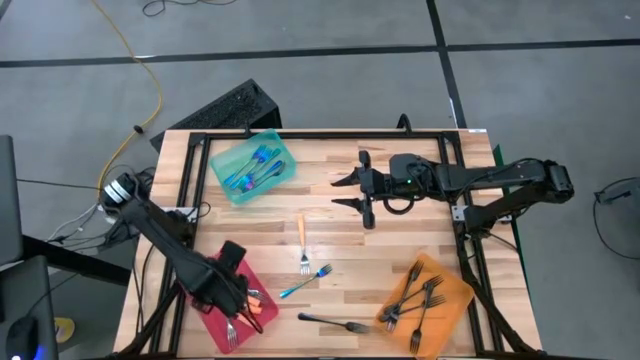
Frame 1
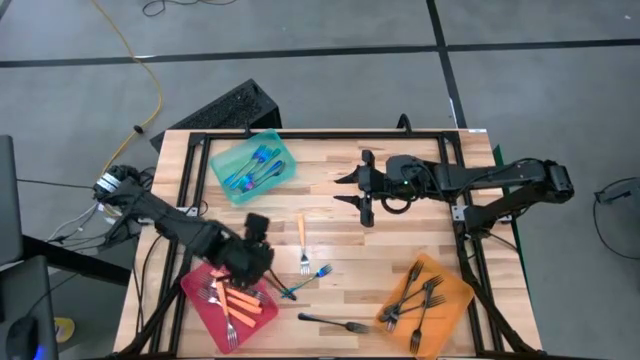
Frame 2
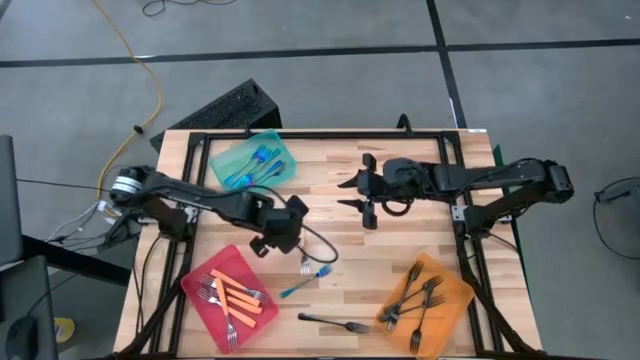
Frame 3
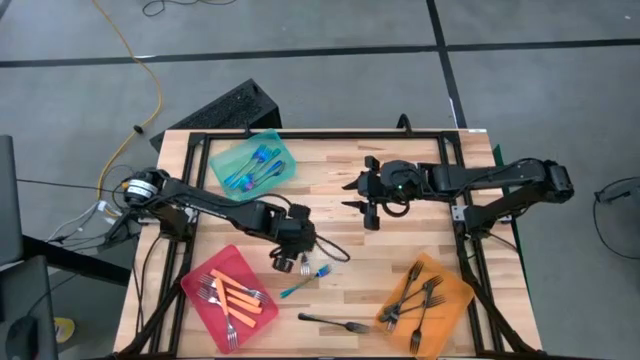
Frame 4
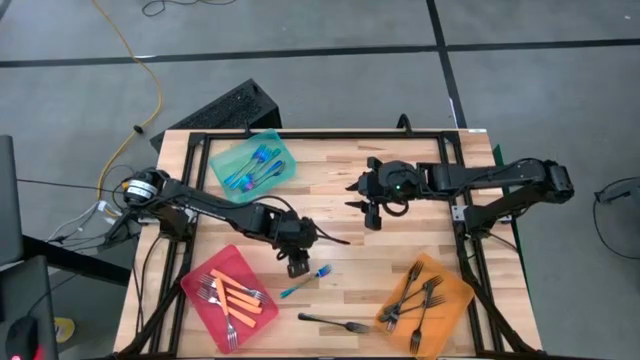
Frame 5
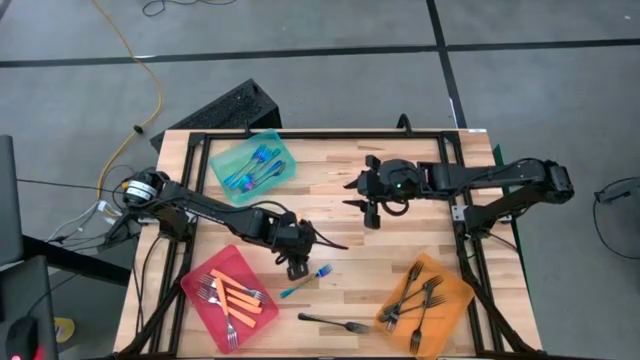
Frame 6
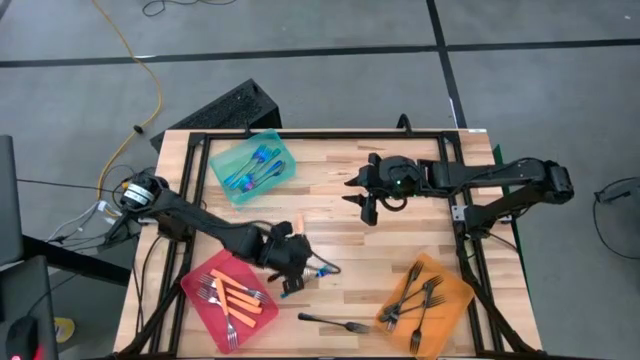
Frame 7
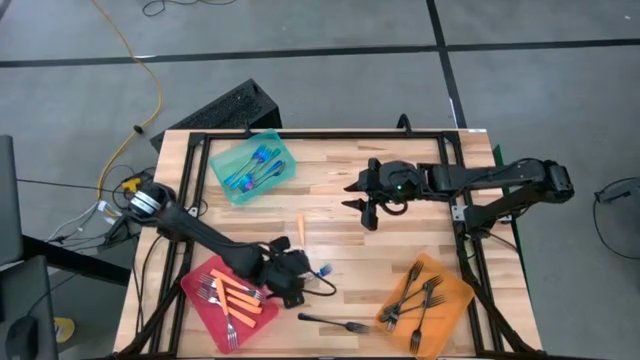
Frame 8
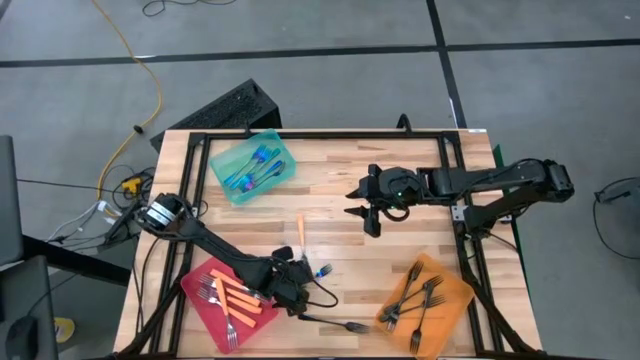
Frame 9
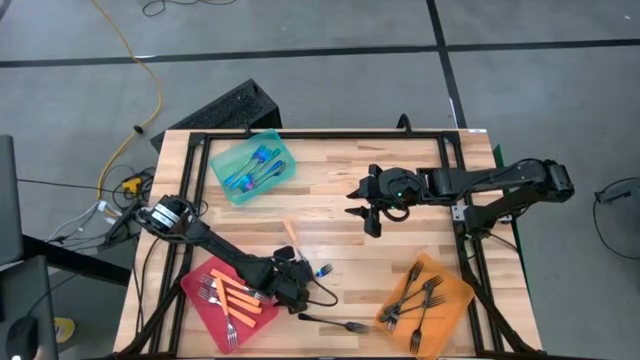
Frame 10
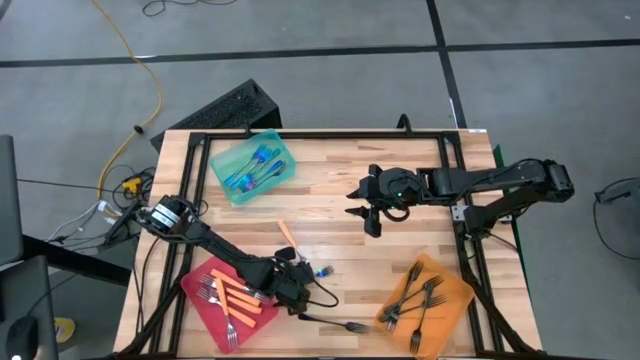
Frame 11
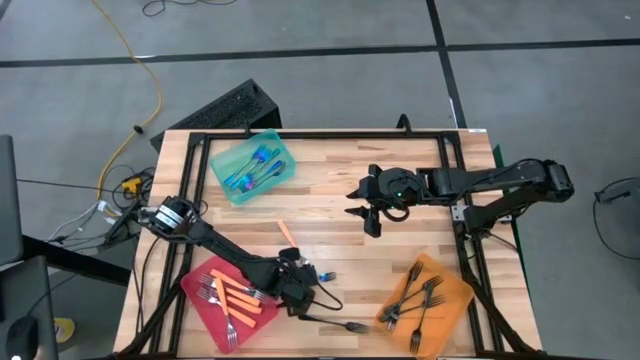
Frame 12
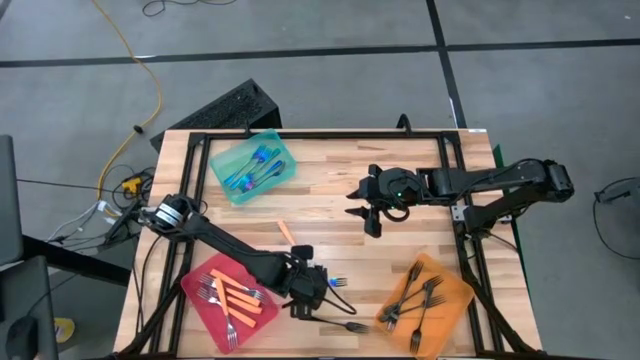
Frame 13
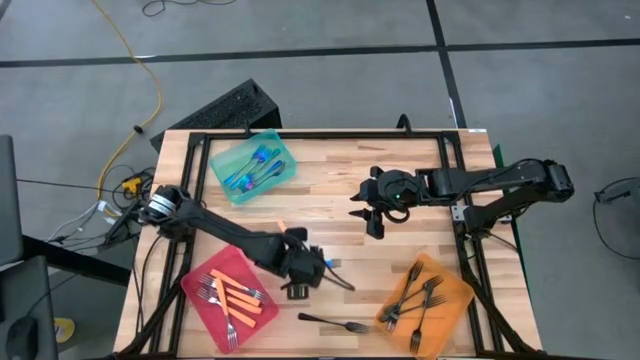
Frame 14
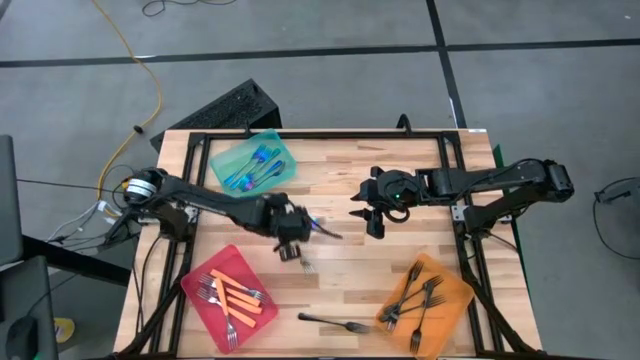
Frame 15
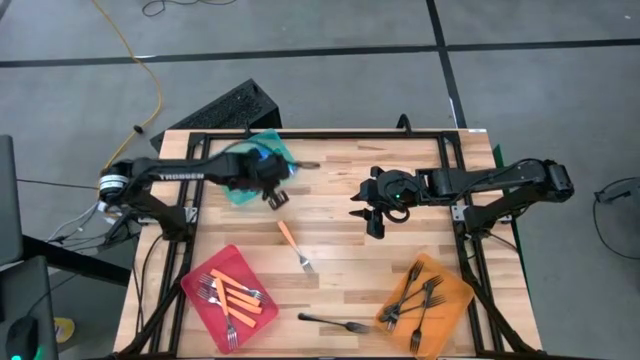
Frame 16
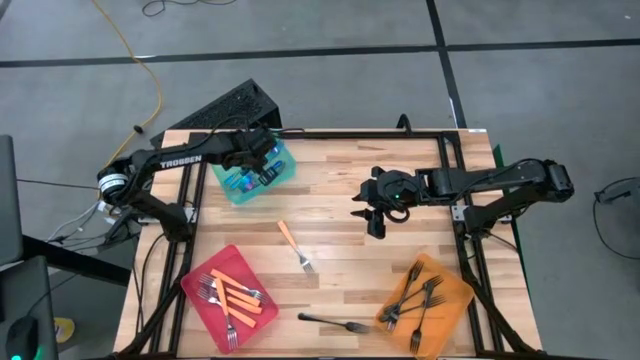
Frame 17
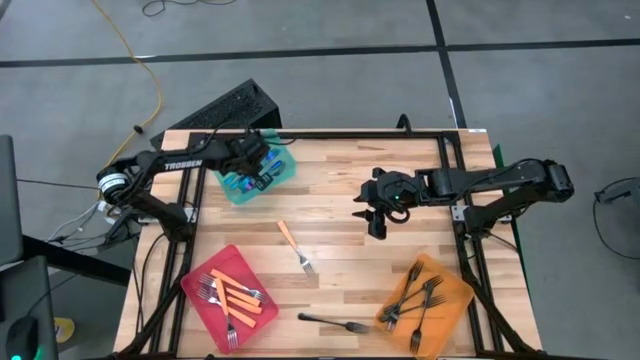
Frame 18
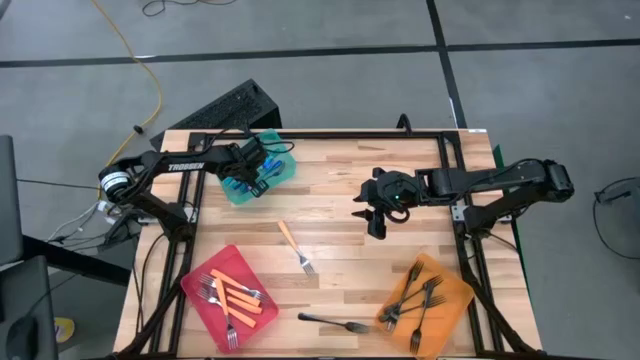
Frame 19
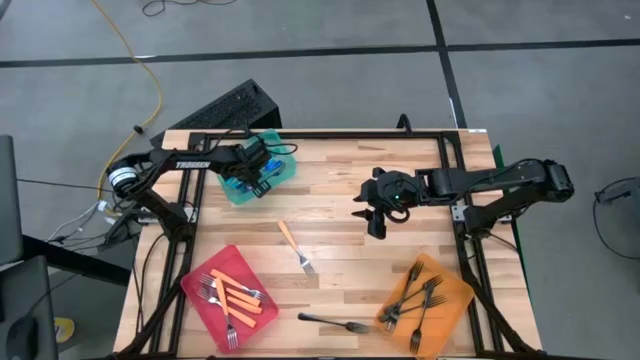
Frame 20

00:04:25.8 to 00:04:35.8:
Task: Sort silverware by color (type)
Put the blue fork into the blue bin

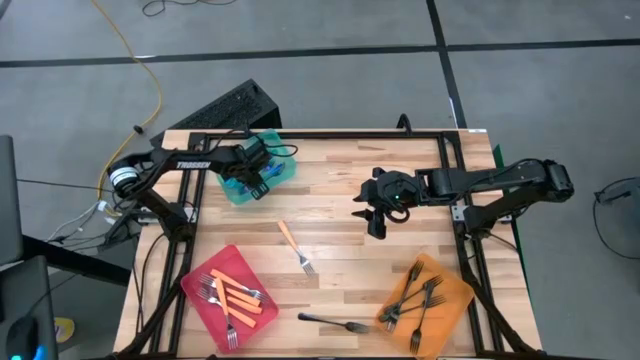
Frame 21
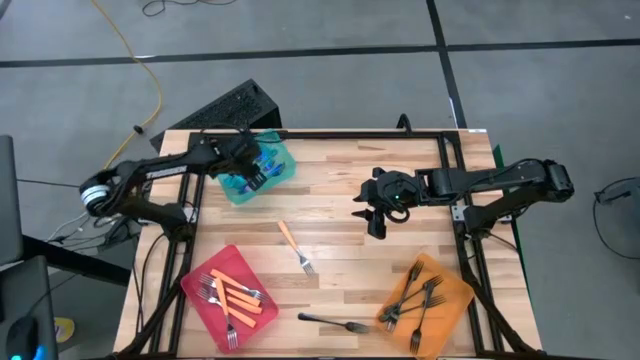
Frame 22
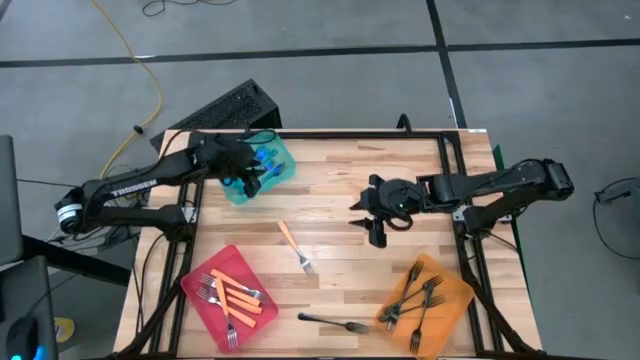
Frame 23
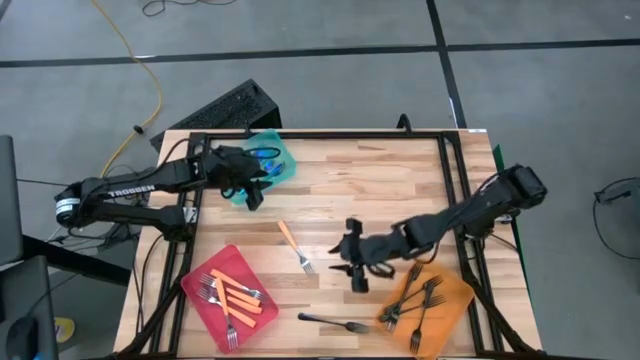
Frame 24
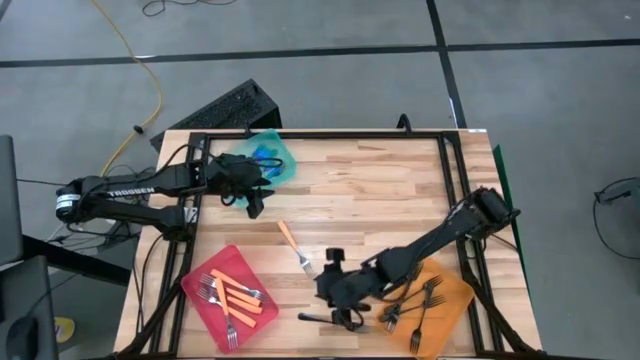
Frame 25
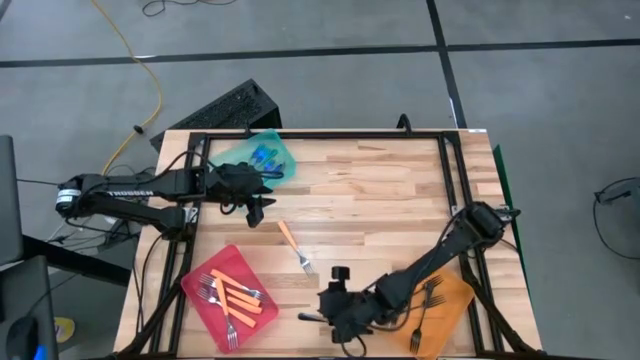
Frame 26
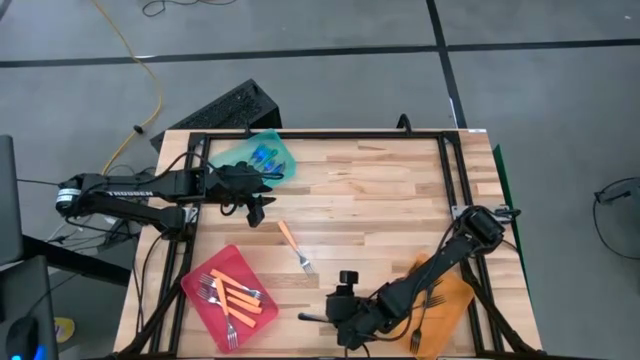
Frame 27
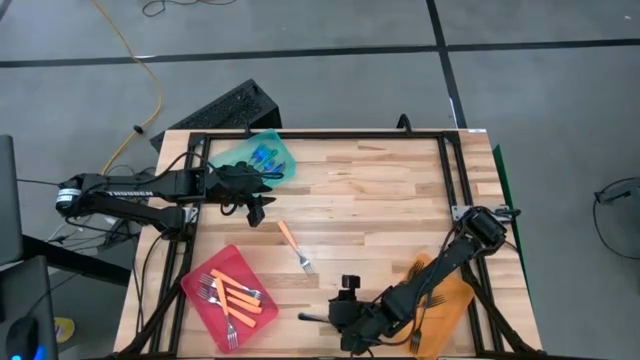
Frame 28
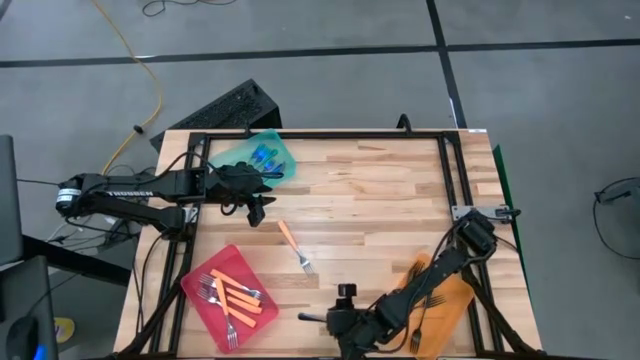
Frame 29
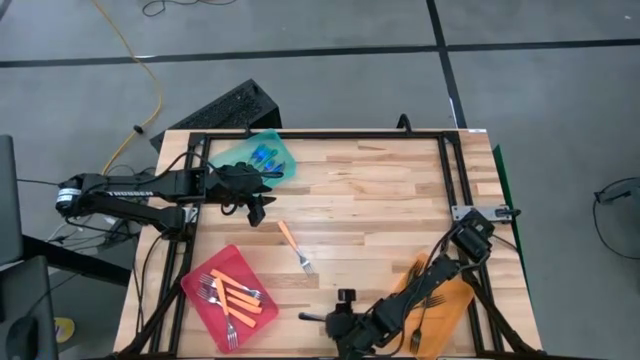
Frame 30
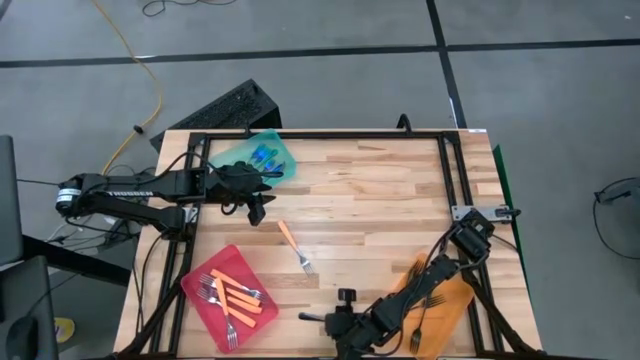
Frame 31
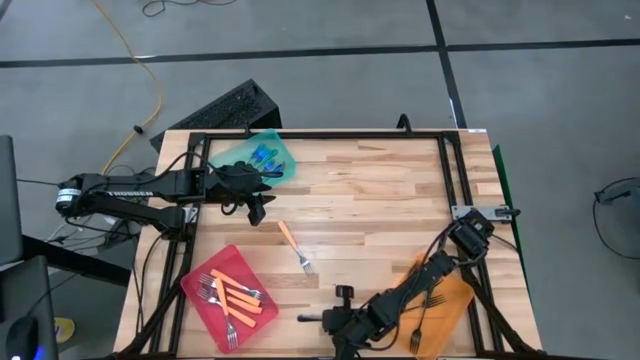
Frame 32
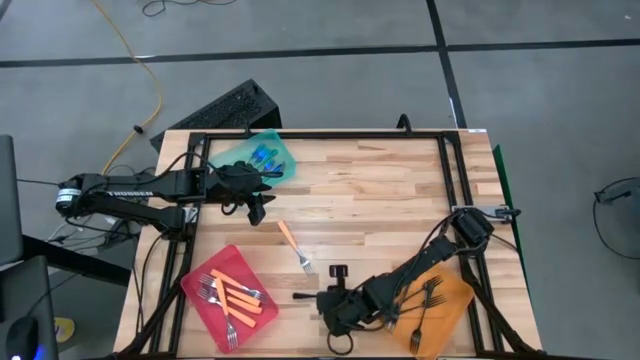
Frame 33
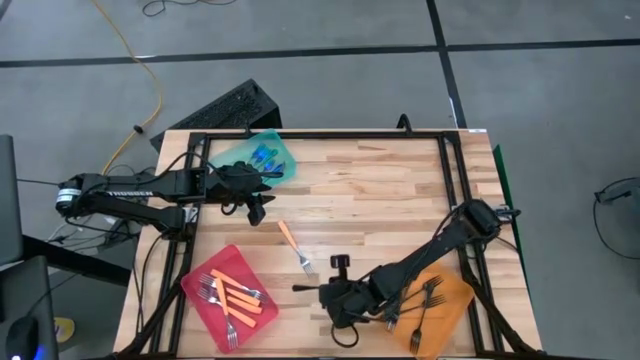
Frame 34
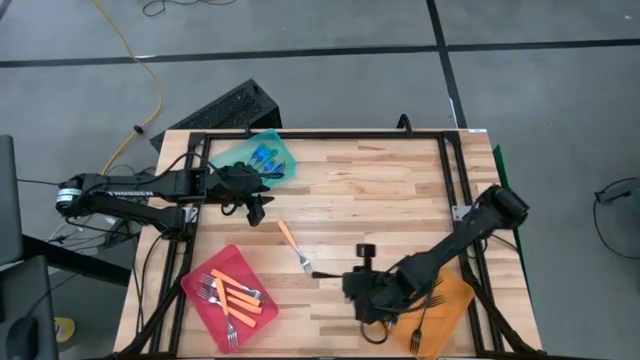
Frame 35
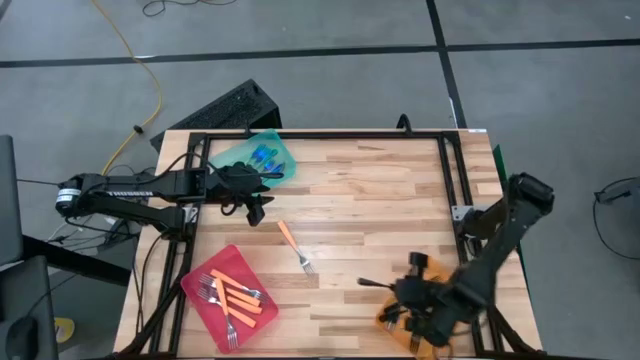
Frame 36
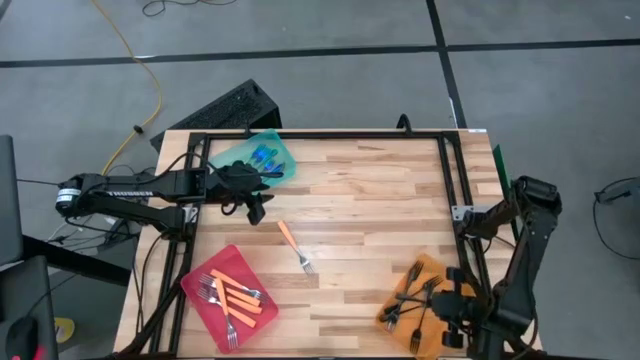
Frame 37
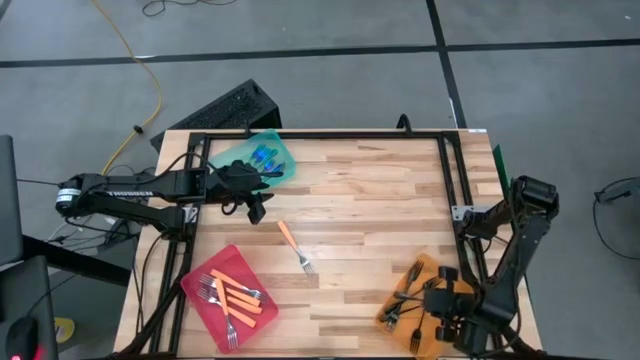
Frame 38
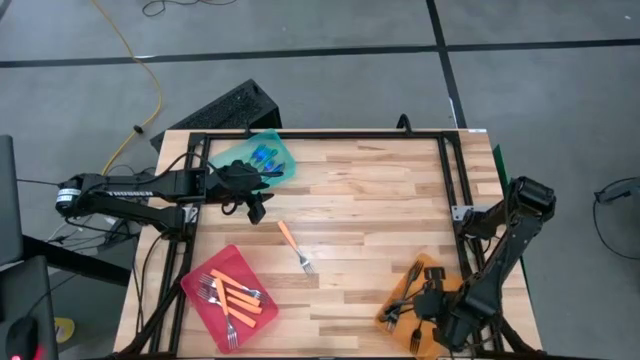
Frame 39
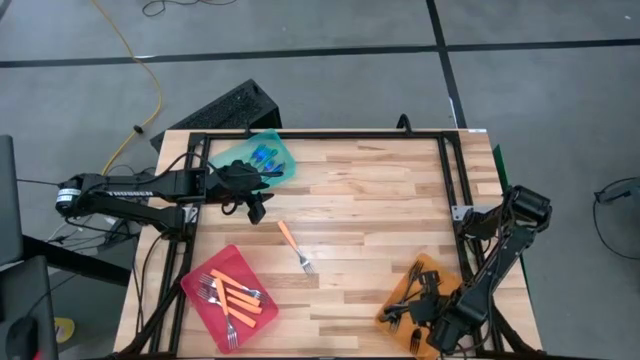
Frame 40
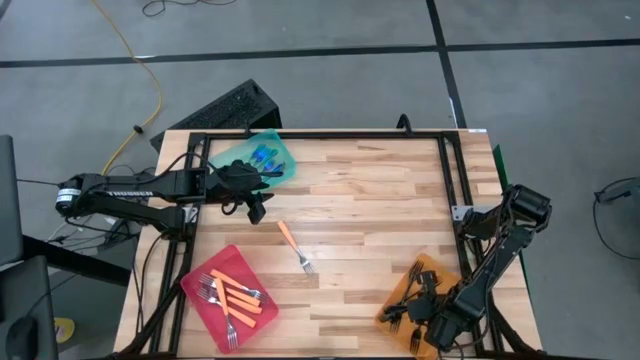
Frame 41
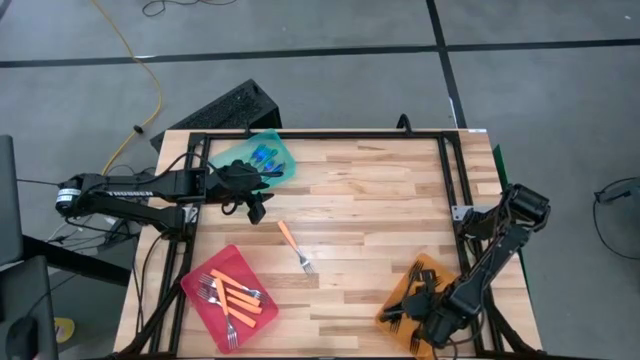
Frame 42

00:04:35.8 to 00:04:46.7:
Put the black fork into the orange bin
